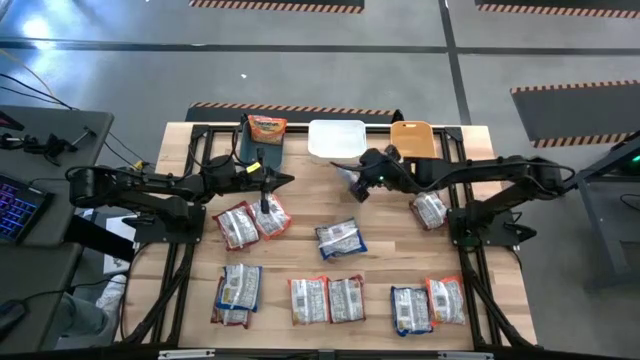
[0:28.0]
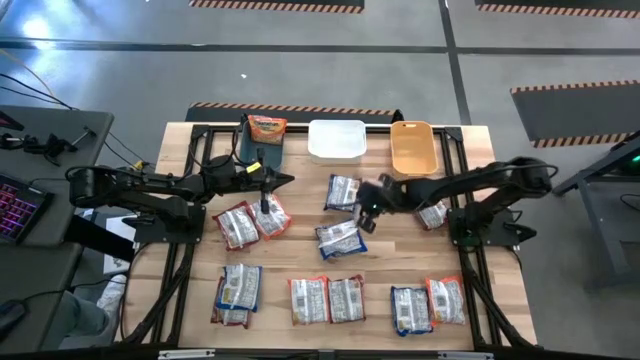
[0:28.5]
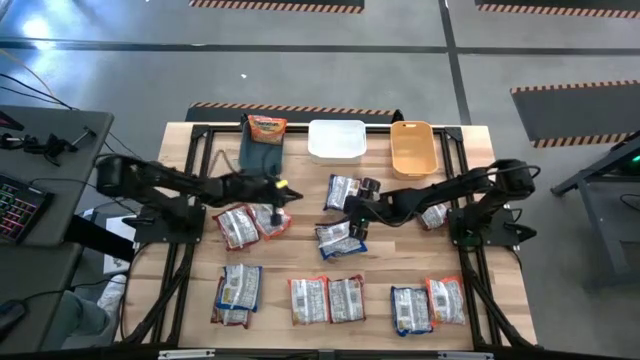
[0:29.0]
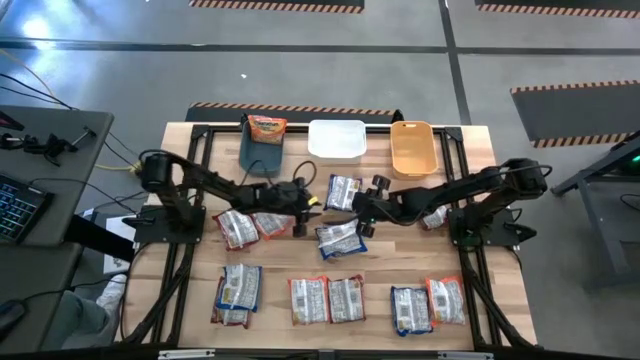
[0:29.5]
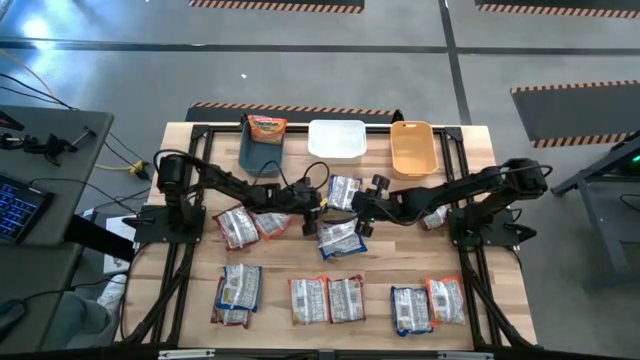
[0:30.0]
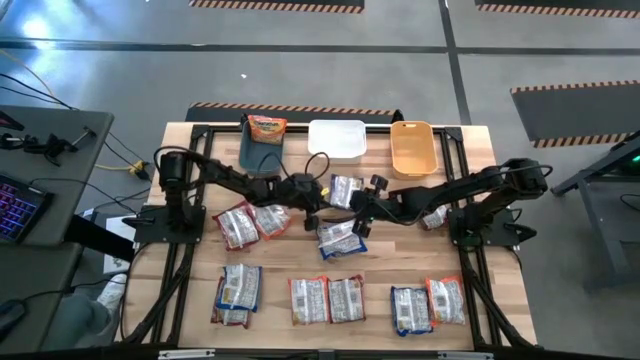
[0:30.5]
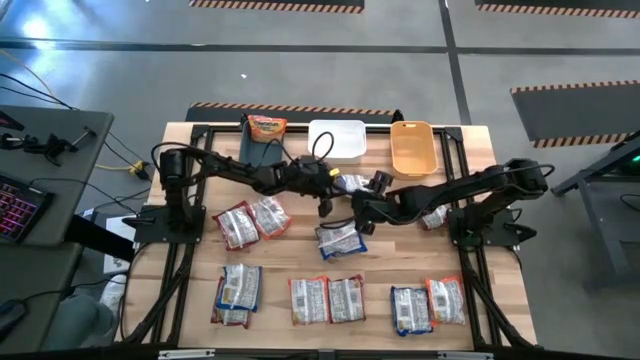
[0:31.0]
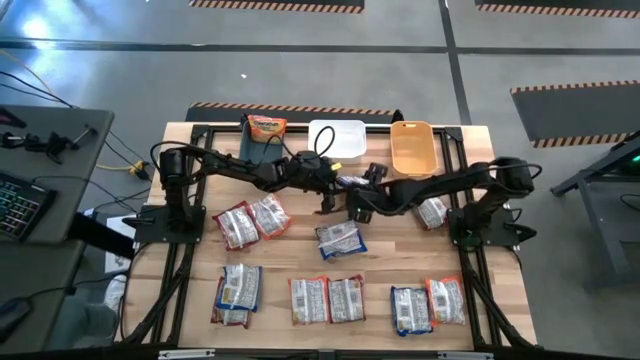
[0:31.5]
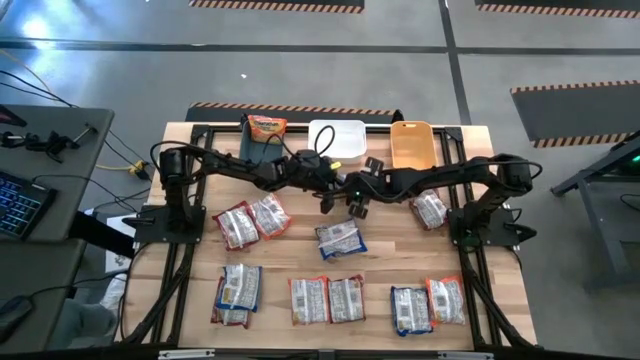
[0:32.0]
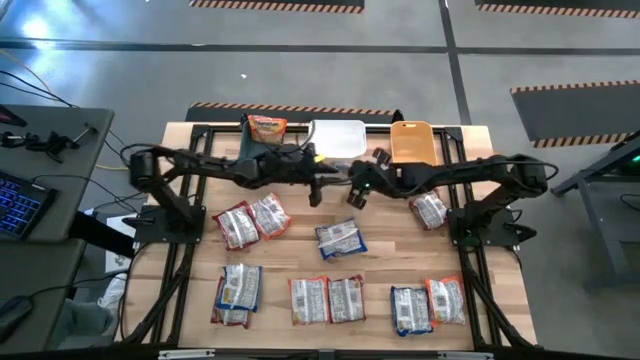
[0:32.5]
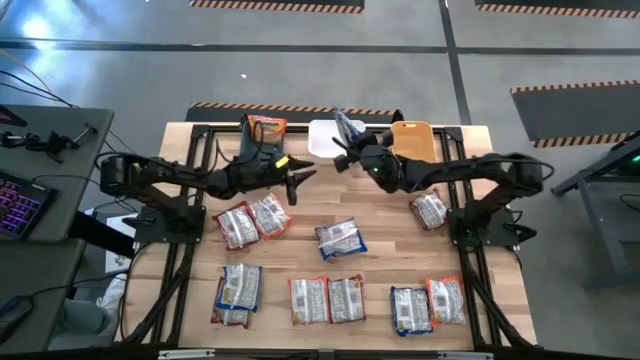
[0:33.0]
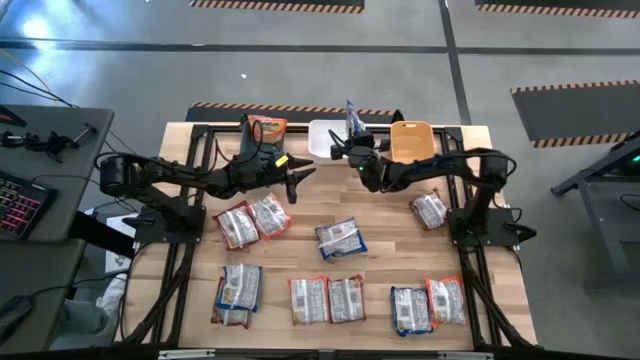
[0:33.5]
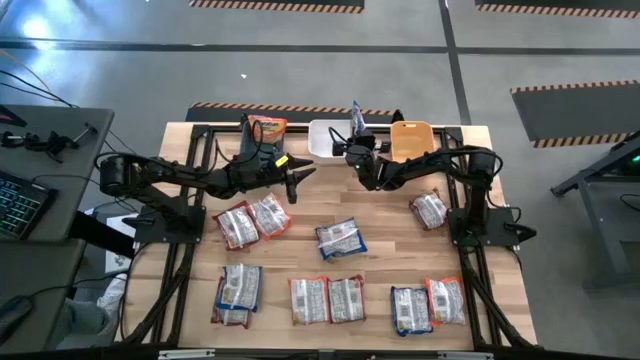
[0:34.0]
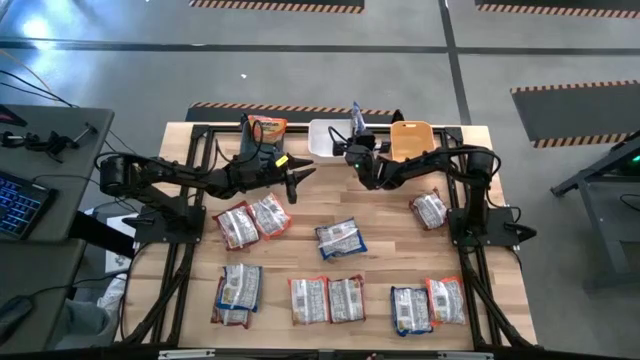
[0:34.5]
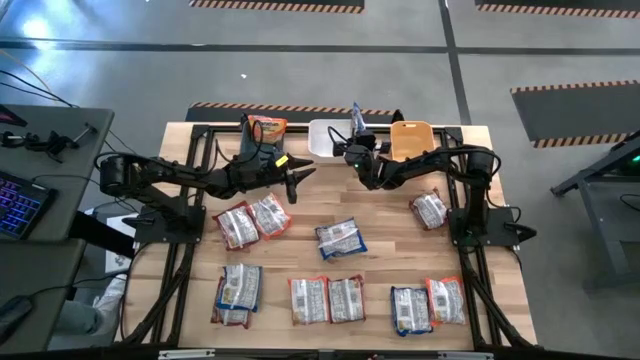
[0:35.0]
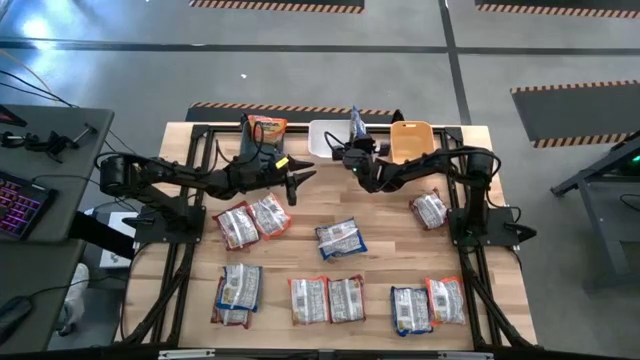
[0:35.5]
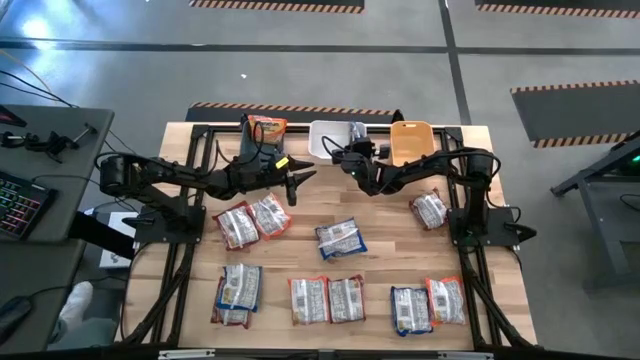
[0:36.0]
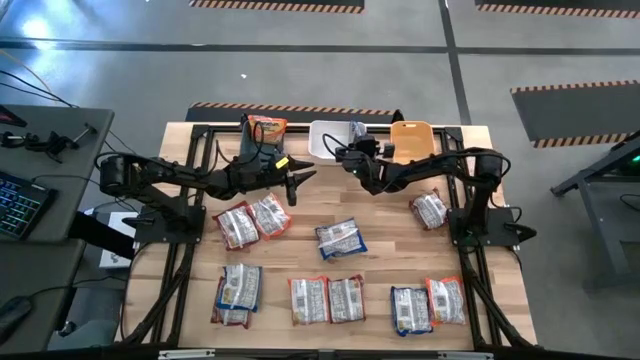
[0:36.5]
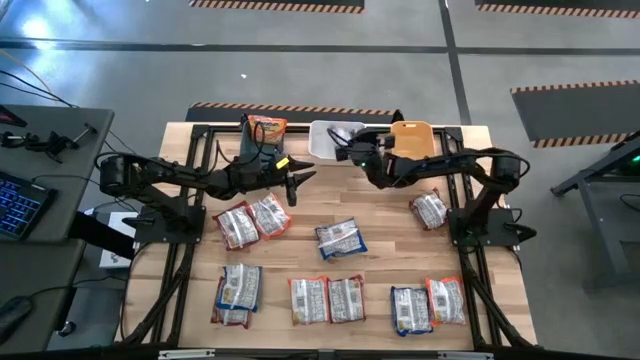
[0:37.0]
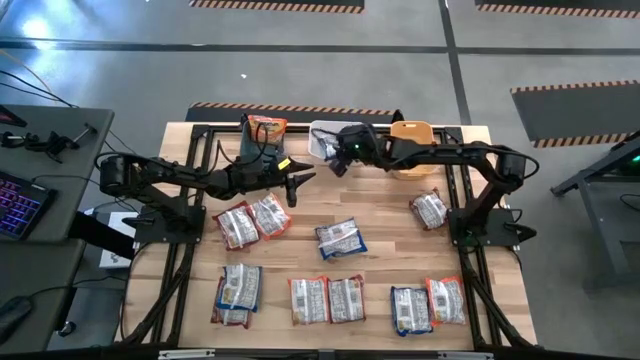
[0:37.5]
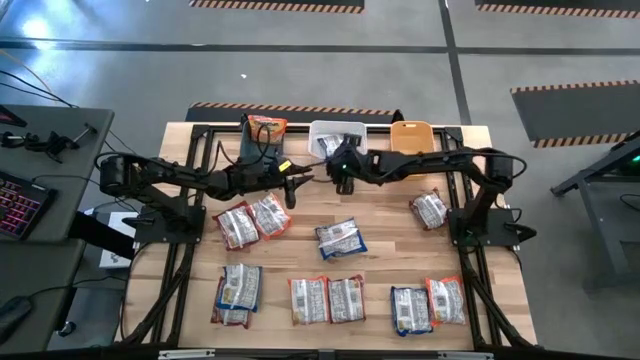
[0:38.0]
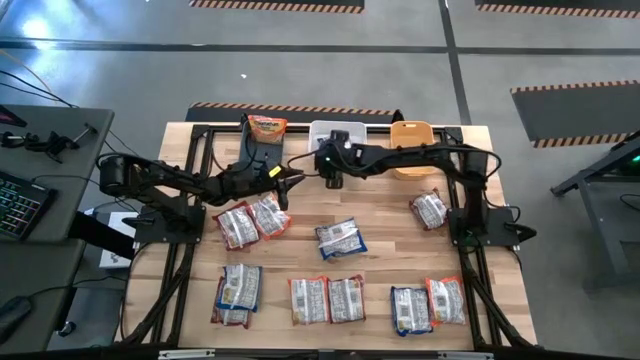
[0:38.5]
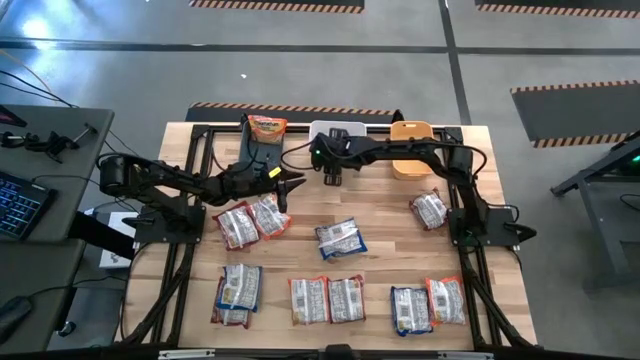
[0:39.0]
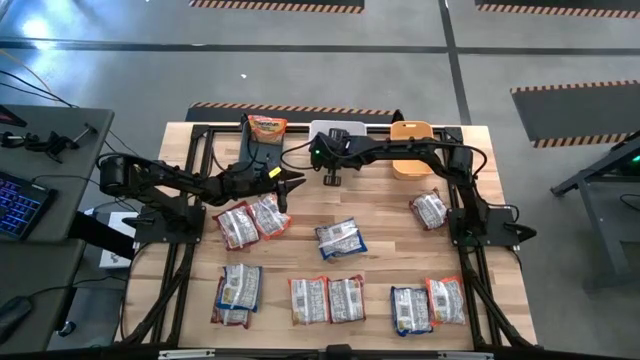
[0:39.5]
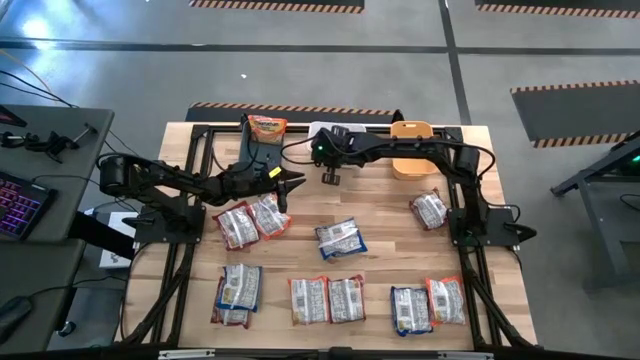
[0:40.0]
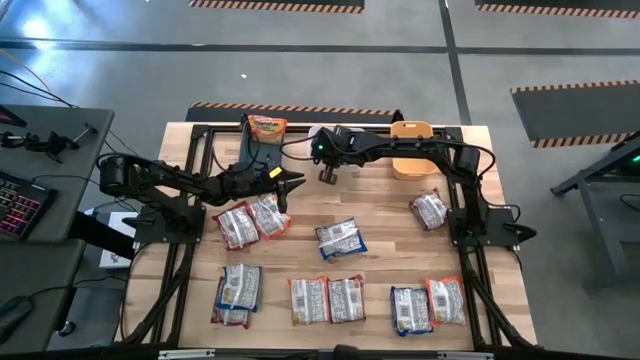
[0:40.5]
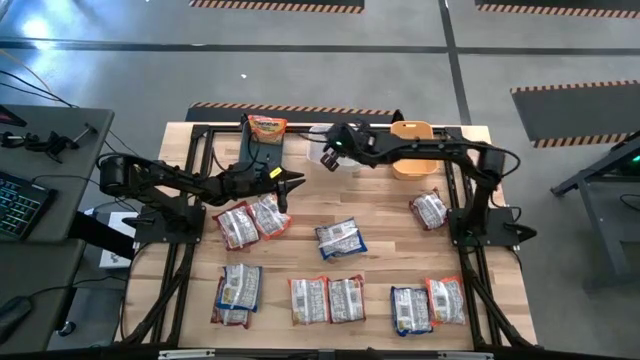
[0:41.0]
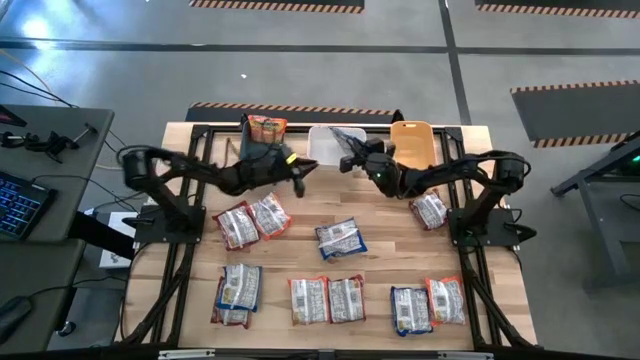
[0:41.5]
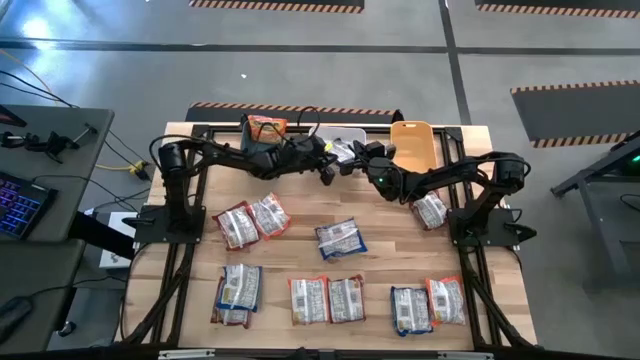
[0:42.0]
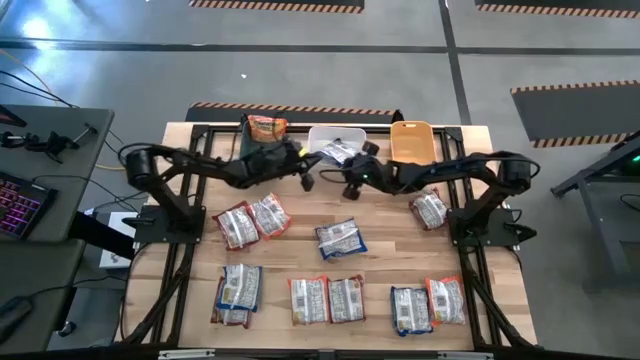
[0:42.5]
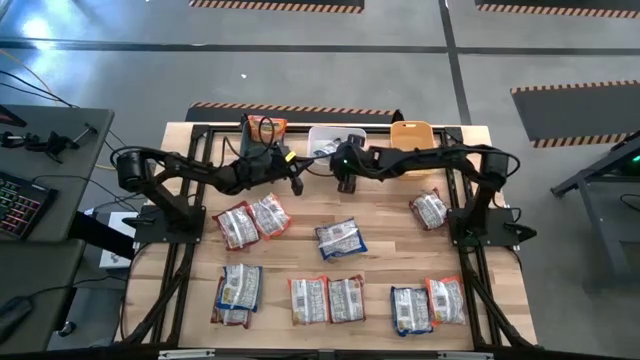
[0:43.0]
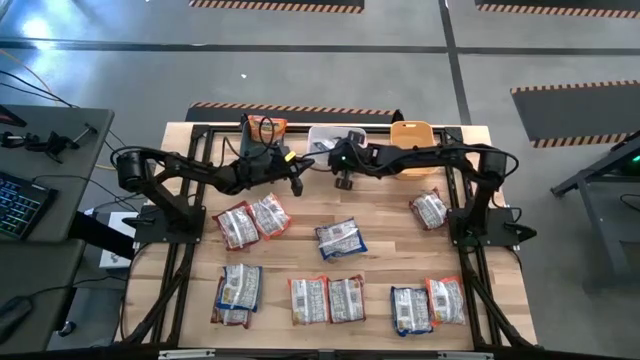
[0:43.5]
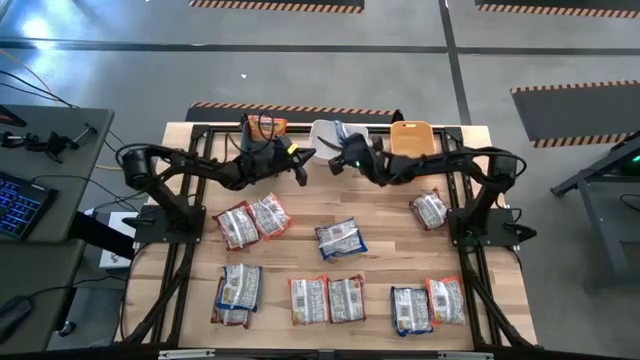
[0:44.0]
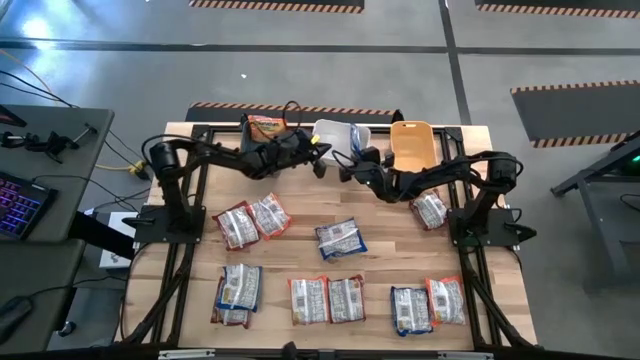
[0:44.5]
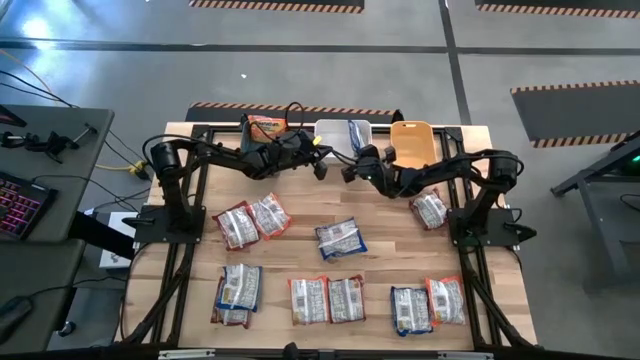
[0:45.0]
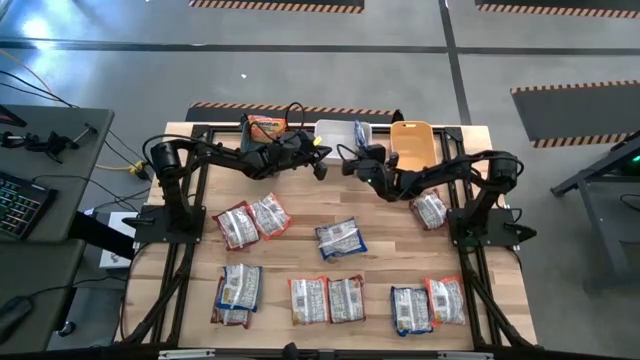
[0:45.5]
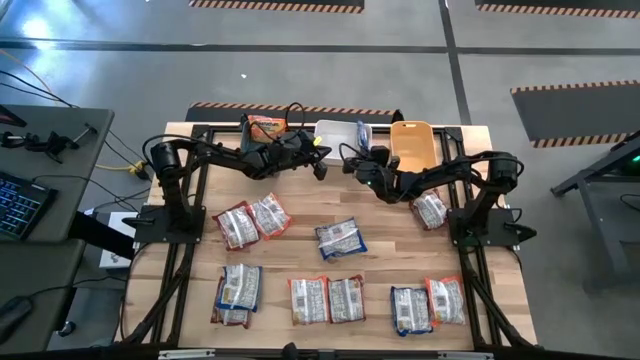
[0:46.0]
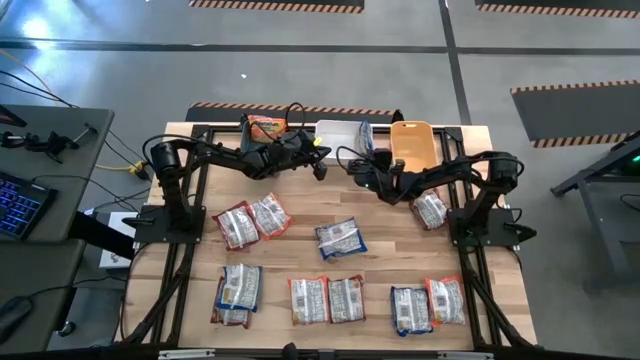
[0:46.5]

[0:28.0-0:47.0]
Task: Sort Maruchan noodles
Put the top blue noodle pack into the white bin

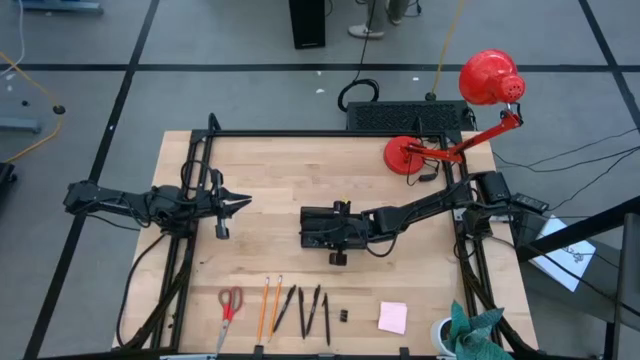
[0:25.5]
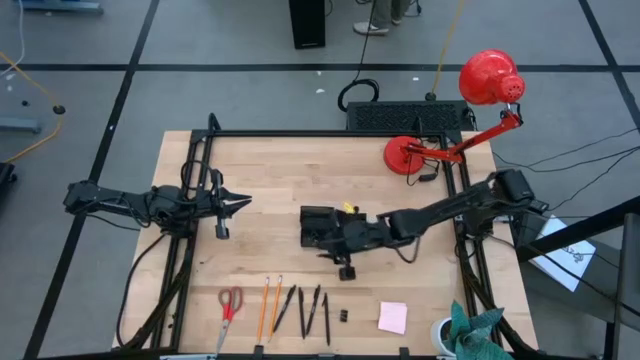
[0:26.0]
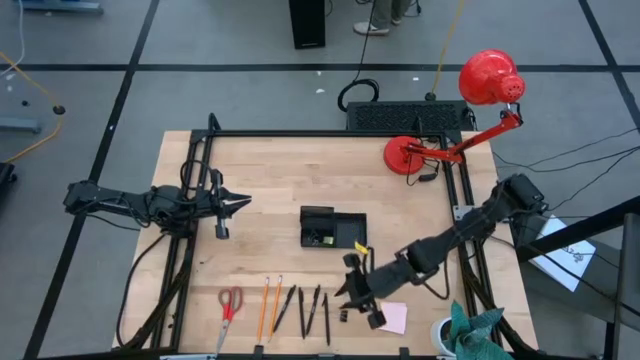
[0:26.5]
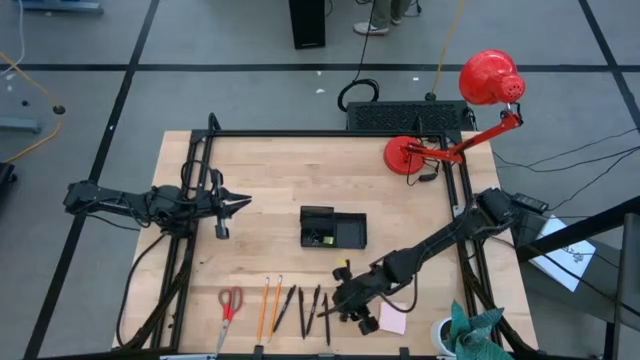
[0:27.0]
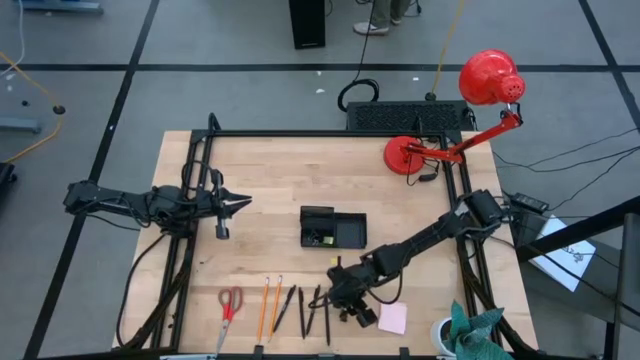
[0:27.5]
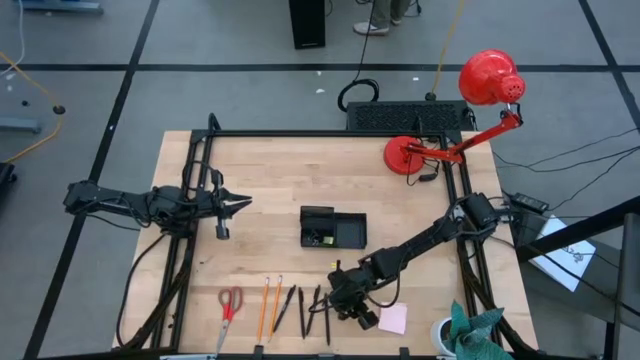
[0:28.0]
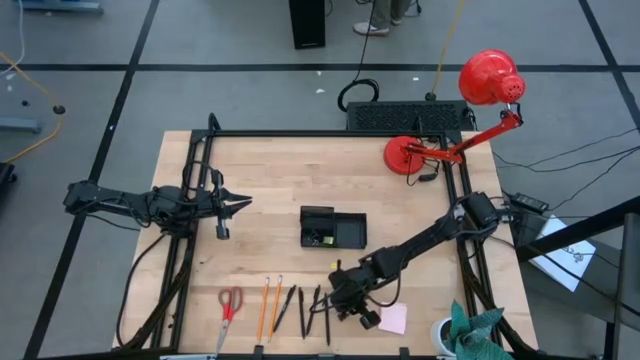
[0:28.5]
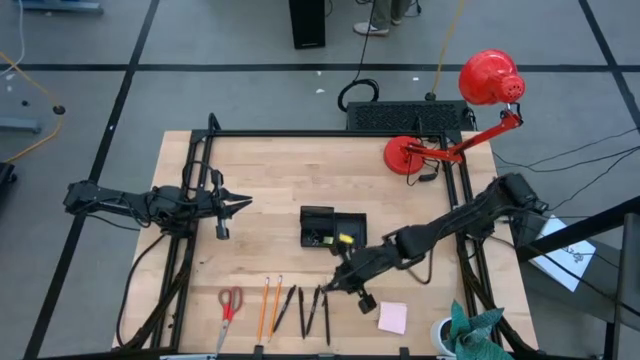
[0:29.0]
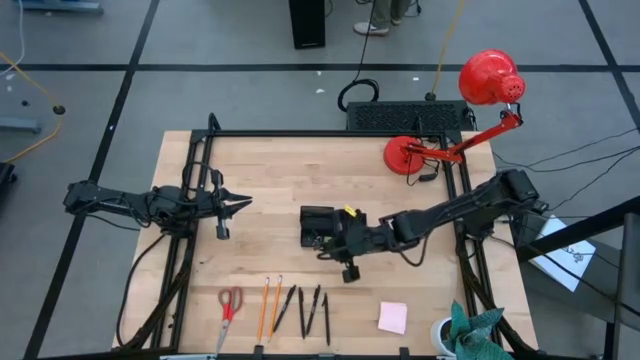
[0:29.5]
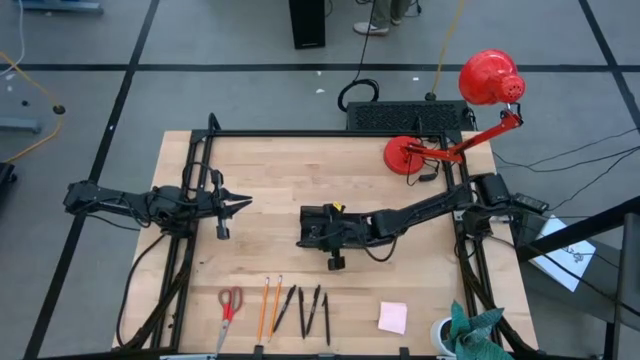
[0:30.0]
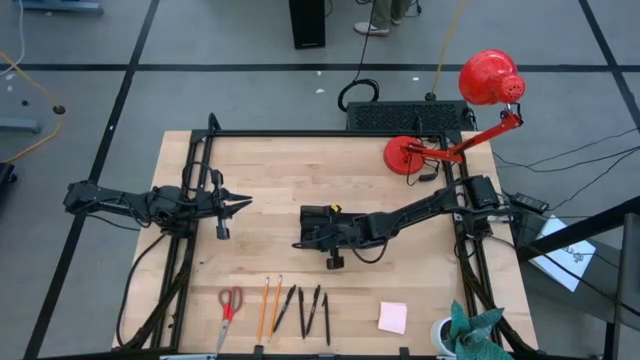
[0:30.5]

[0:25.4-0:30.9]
Task: Pick and place office supplies into organizer
Put the black binder clip into the desk organizer
